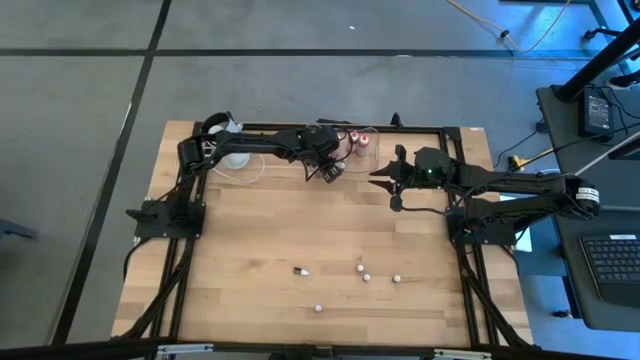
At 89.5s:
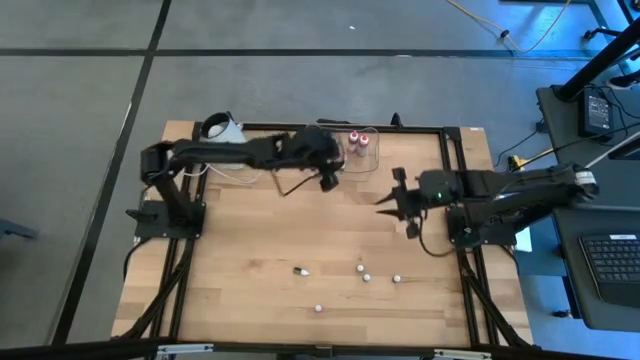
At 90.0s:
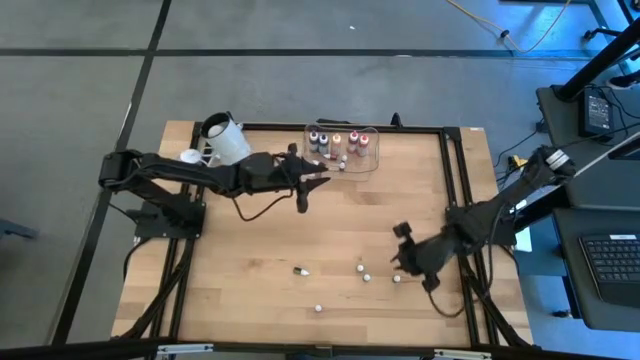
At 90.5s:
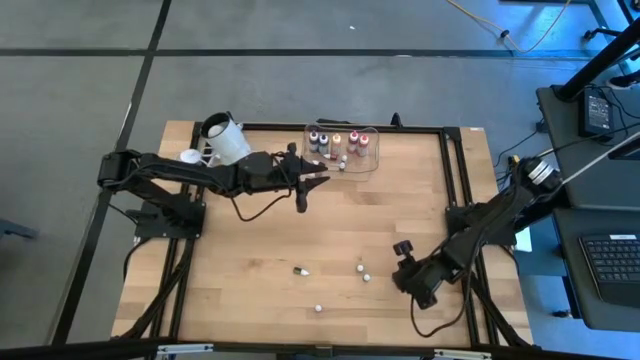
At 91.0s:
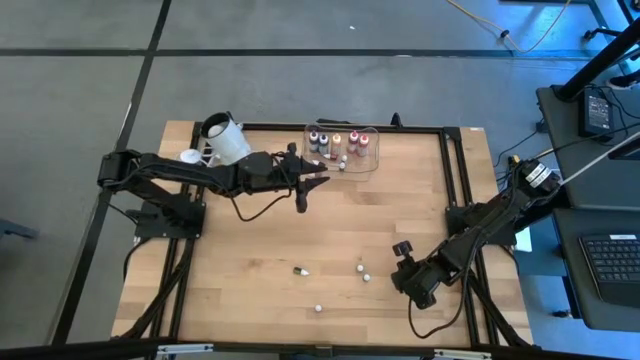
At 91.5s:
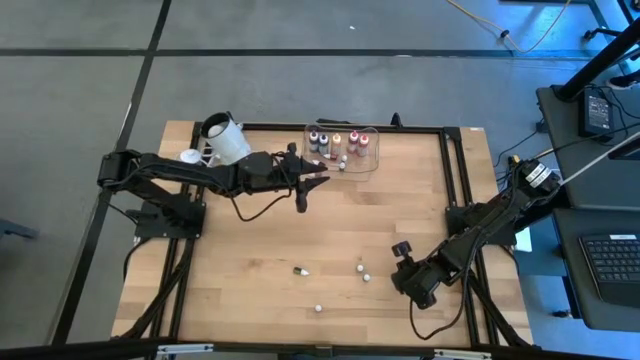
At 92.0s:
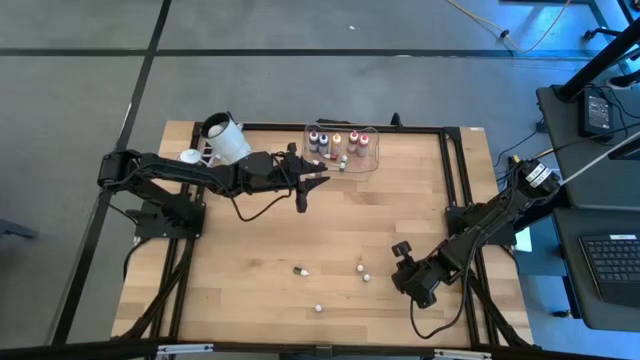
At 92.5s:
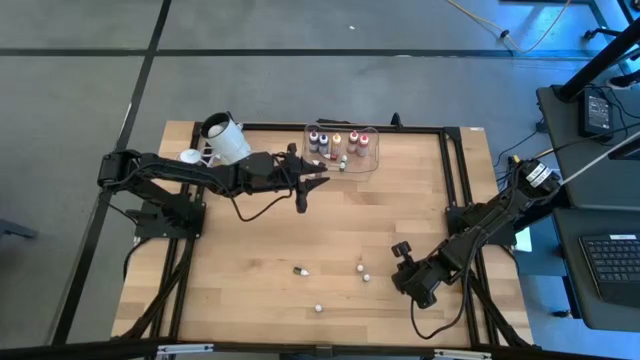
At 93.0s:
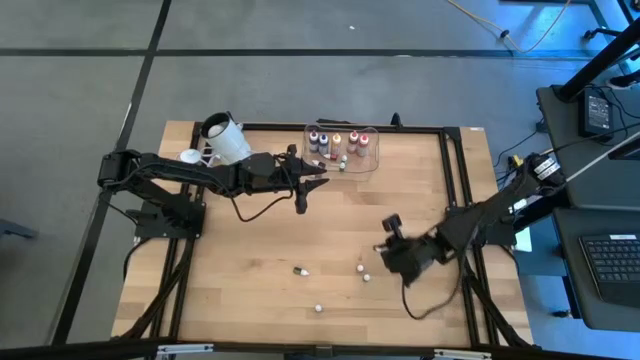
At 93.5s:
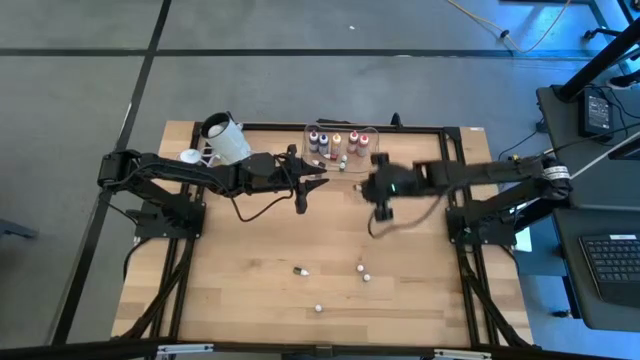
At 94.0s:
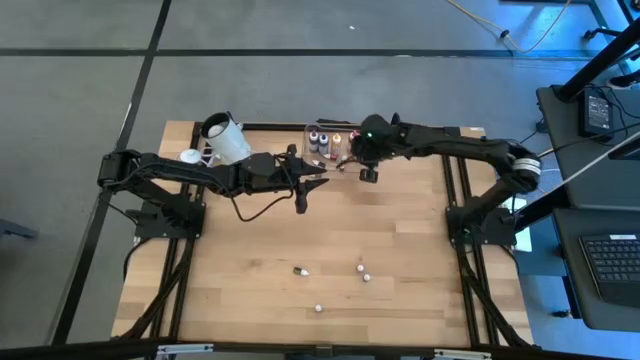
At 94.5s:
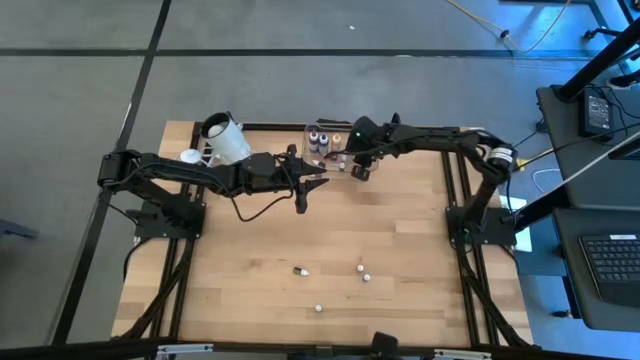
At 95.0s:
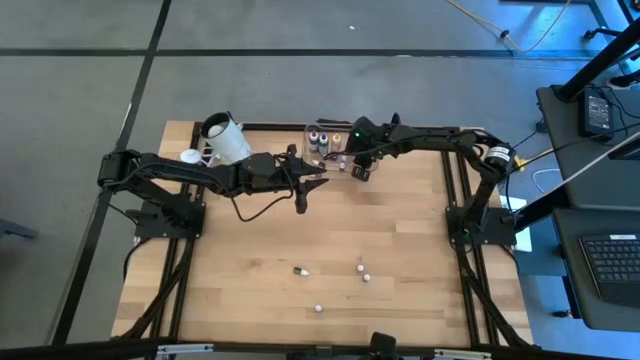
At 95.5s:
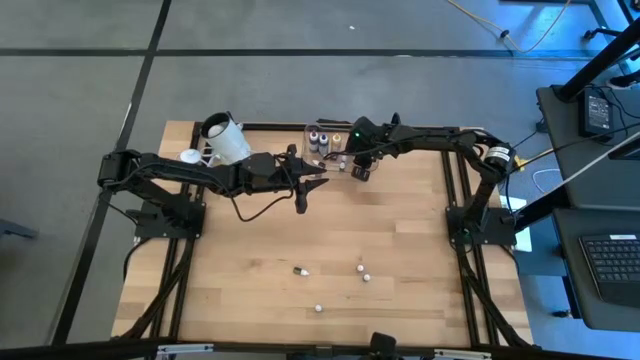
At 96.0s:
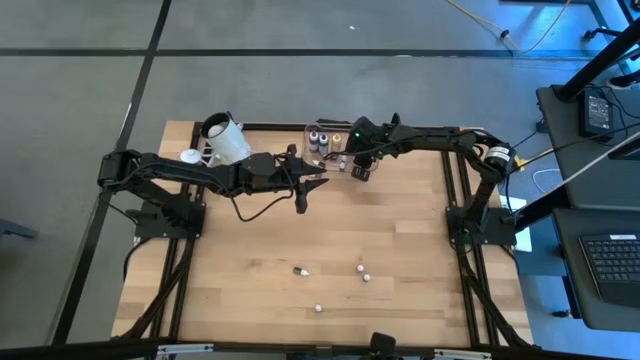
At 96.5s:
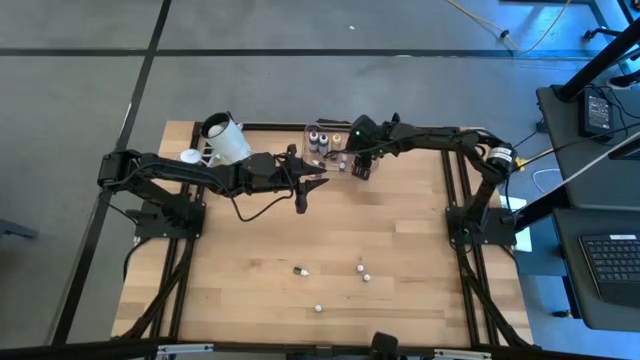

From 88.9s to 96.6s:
Task: Pick & Place food coloring
Put the top right small red food coloring bottle into the transparent container

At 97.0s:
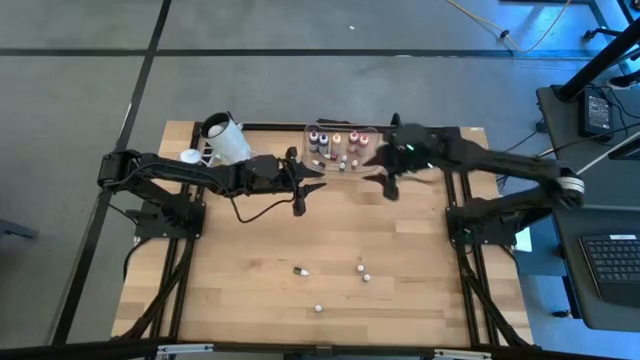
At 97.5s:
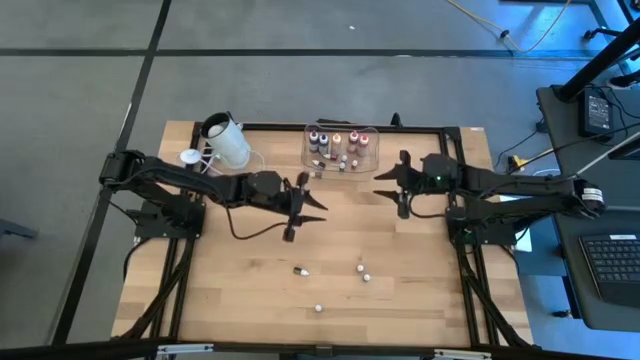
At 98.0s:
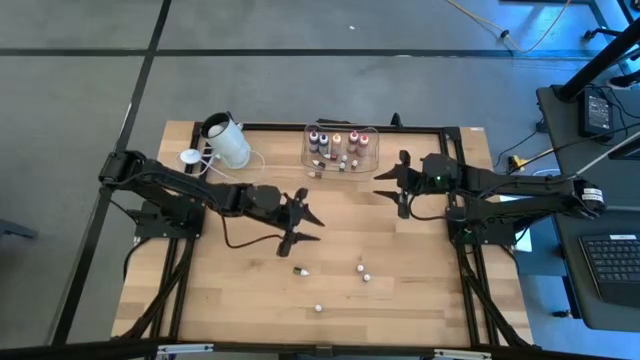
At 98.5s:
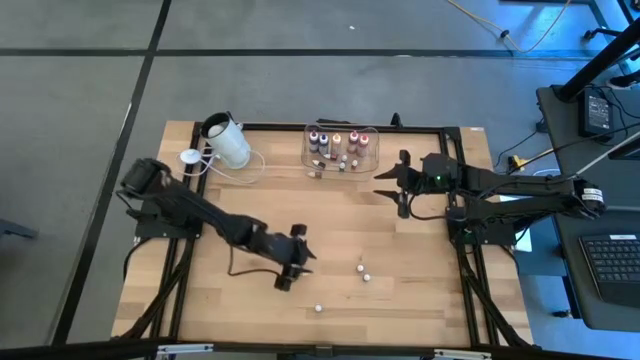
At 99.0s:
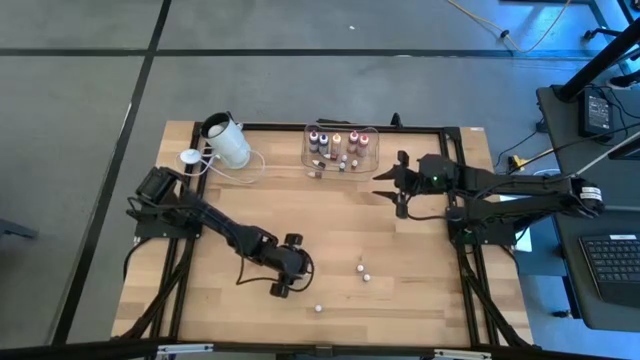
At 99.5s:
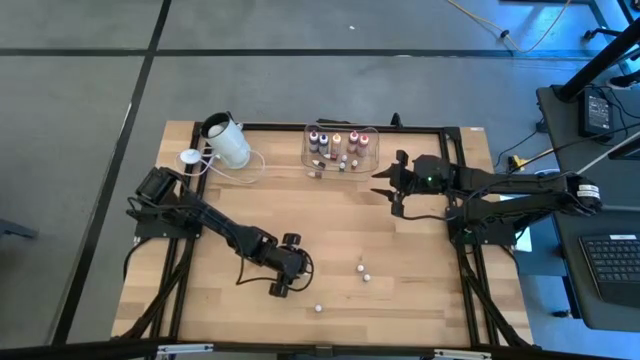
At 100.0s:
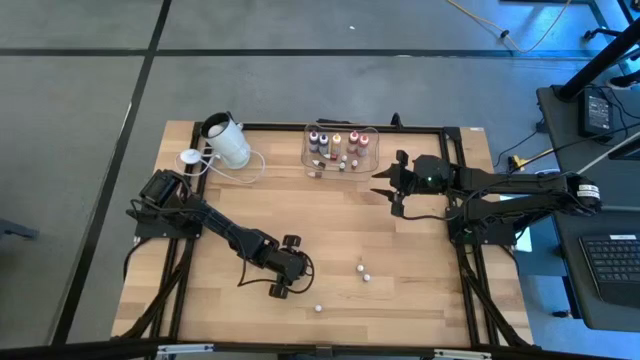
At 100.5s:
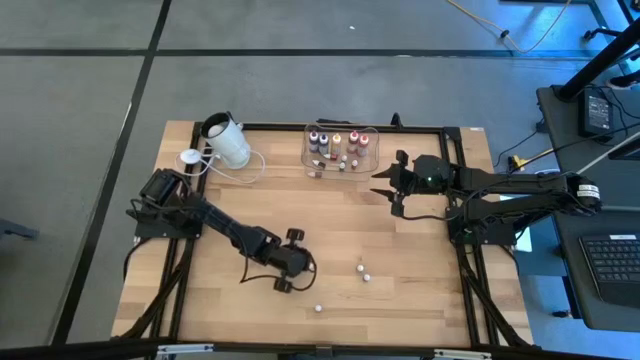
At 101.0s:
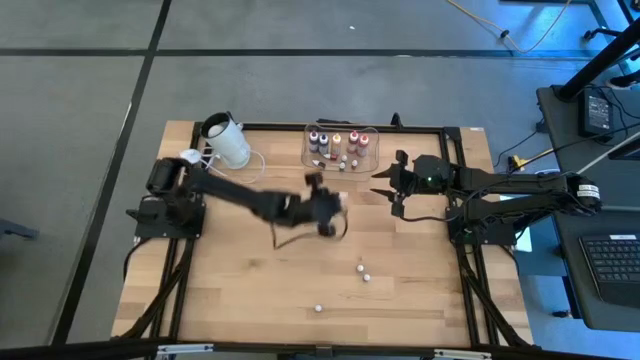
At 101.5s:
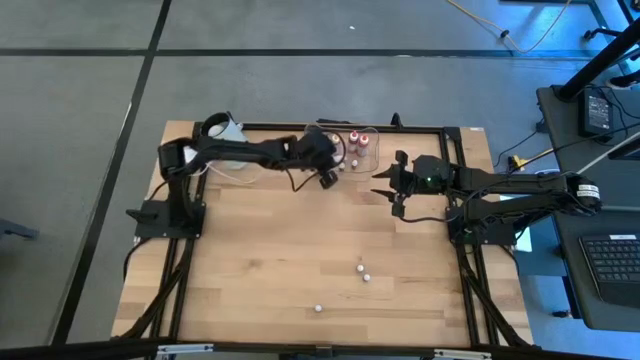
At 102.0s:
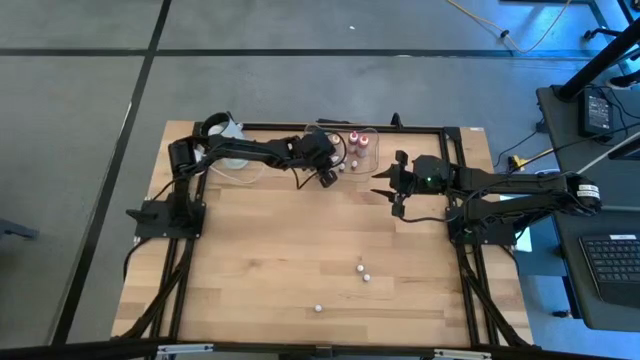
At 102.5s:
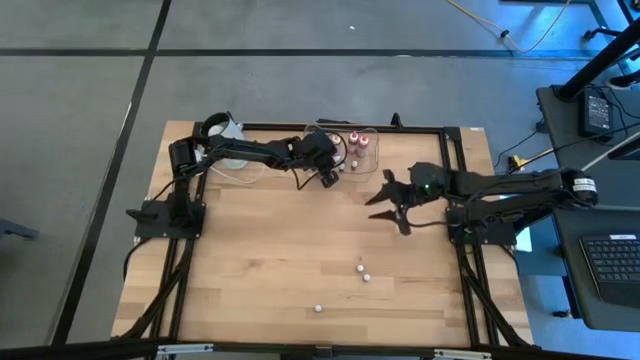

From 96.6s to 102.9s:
Put the small green food coloring bottle into the transparent container

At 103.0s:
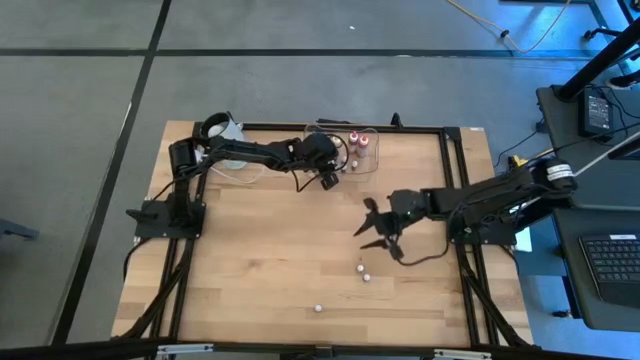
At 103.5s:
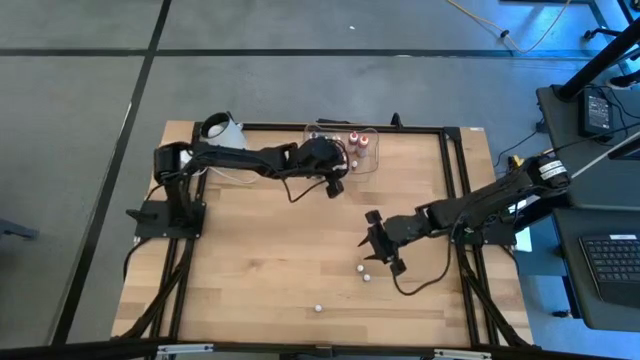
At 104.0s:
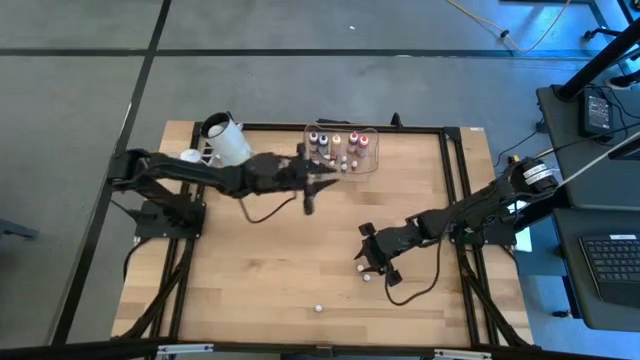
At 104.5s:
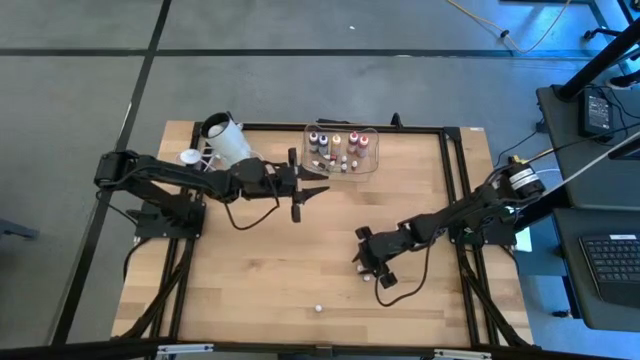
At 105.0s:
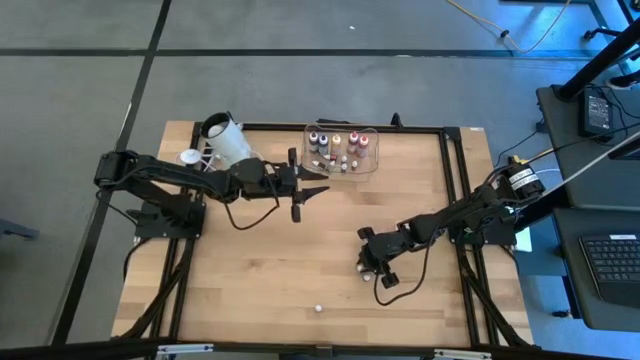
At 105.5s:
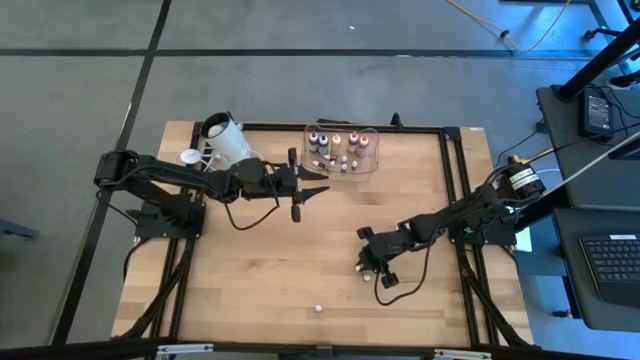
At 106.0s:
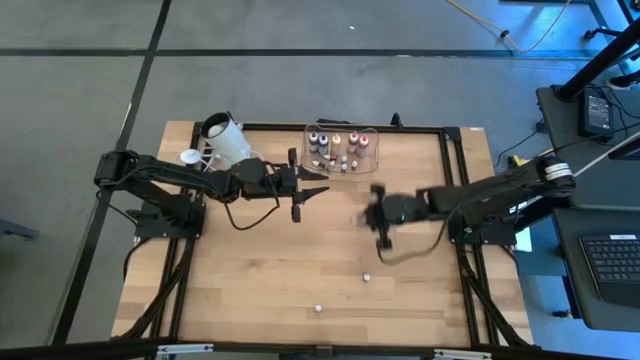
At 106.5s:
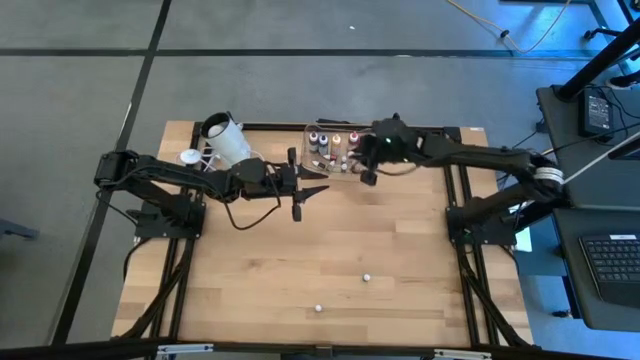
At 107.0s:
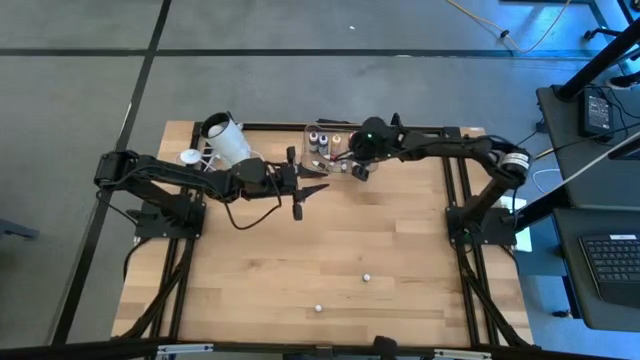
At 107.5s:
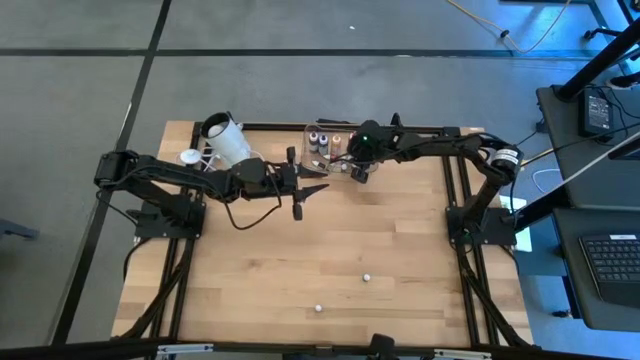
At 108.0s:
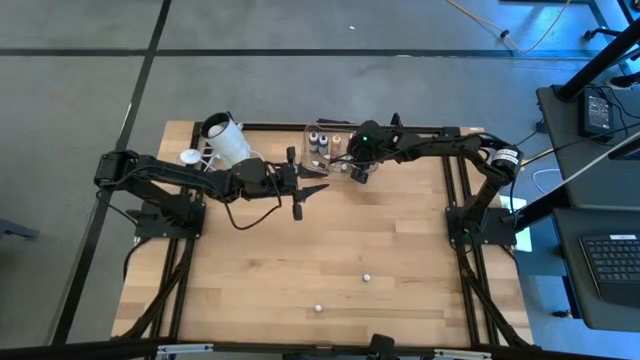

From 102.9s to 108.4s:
Put the top small red food coloring bottle into the transparent container

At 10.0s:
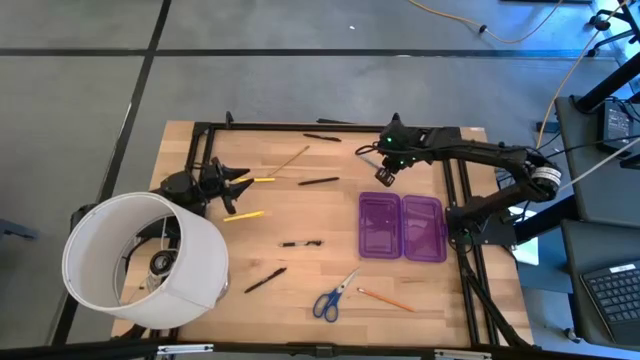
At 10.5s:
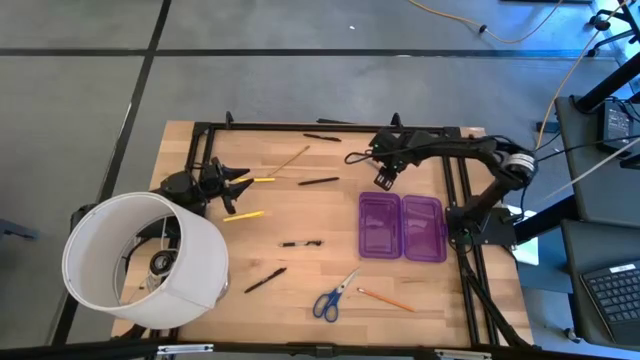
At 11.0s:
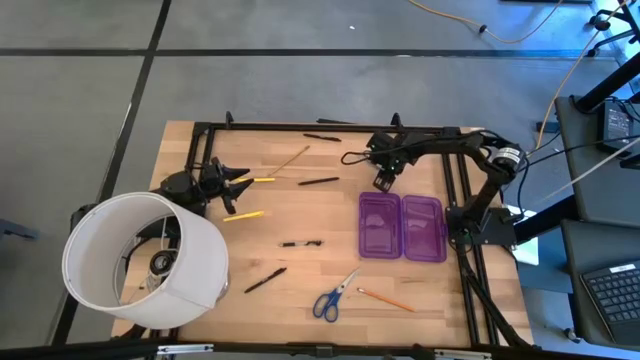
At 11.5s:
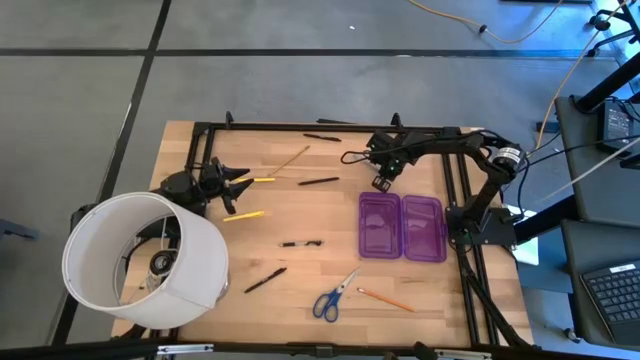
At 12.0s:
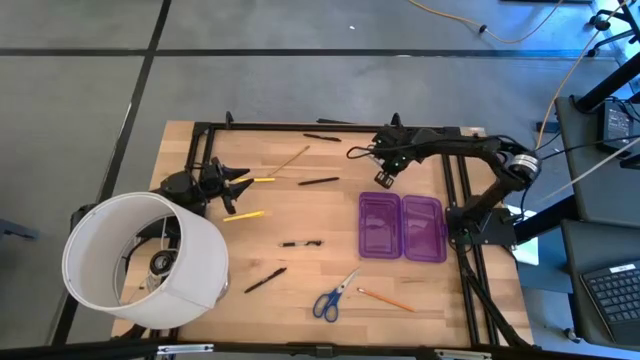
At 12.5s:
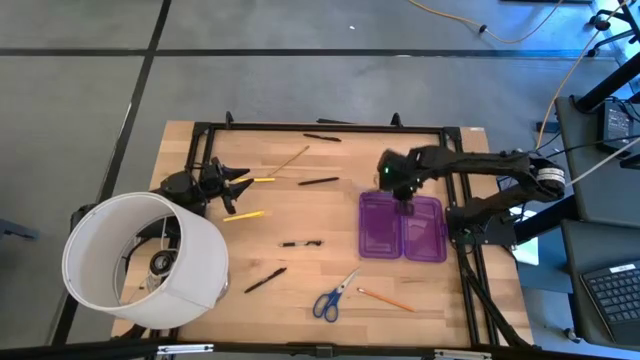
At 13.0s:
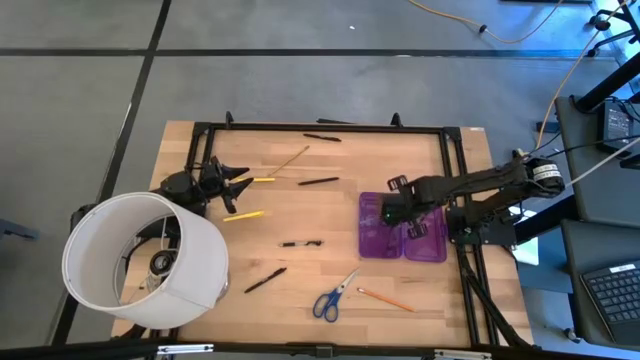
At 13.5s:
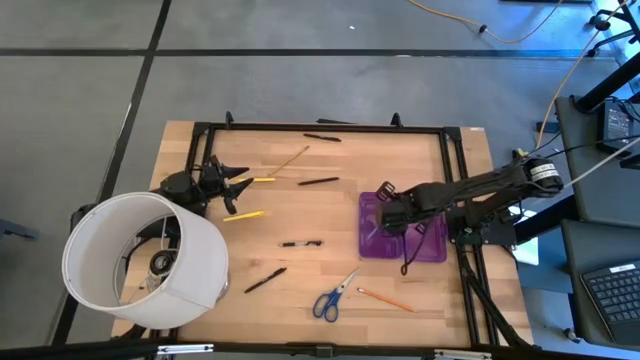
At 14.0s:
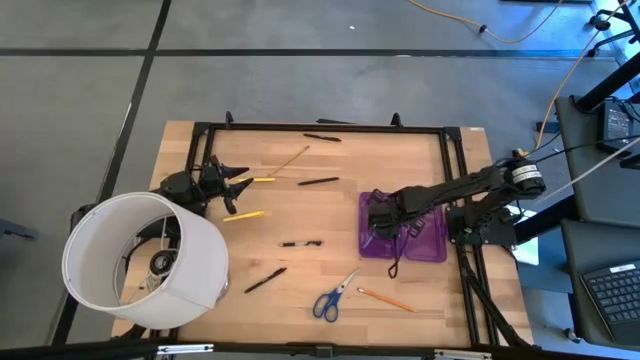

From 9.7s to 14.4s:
Task: Pick & place school supplies into a supply box
Put the blue pen into the supply box
